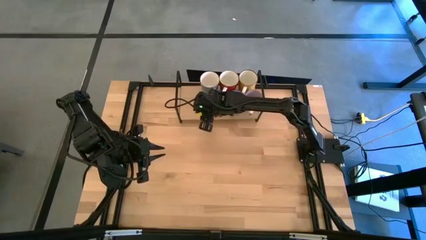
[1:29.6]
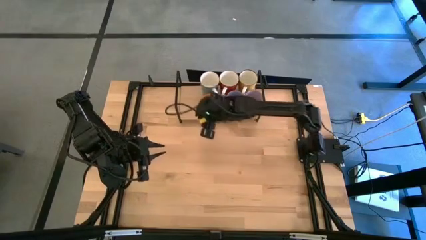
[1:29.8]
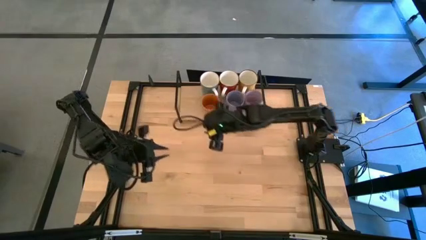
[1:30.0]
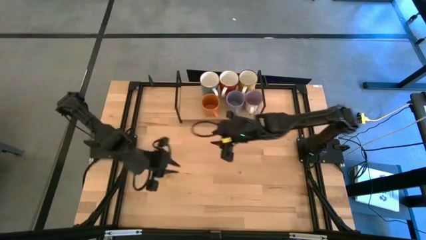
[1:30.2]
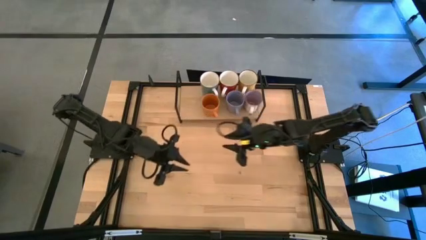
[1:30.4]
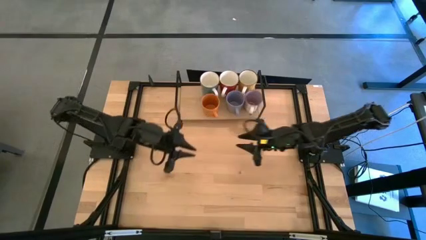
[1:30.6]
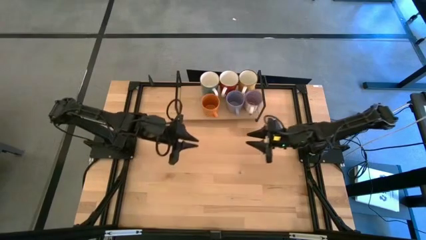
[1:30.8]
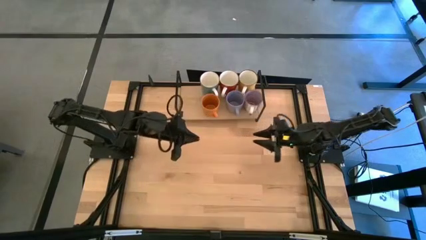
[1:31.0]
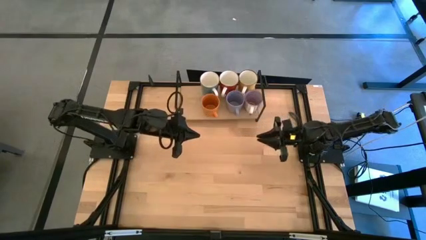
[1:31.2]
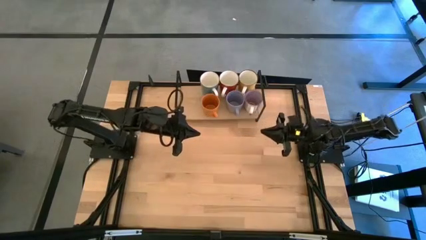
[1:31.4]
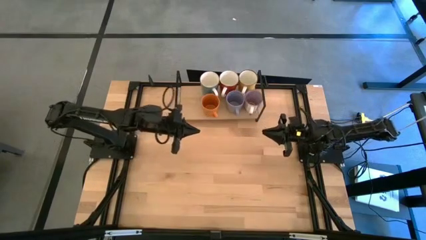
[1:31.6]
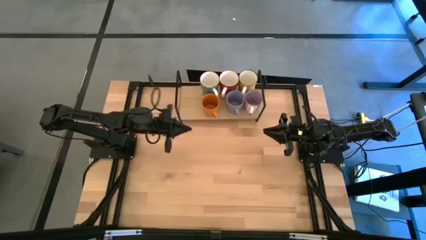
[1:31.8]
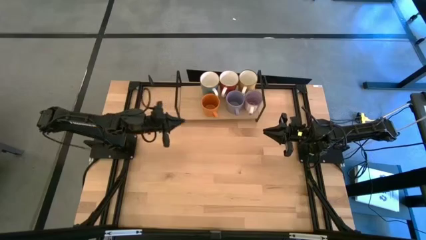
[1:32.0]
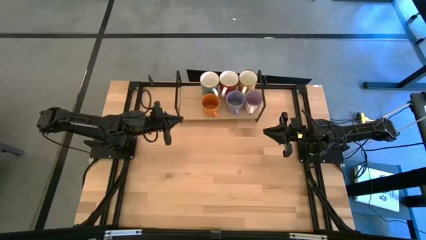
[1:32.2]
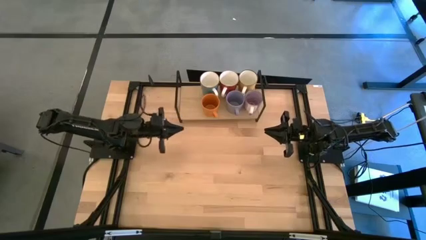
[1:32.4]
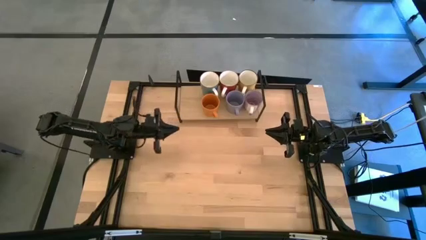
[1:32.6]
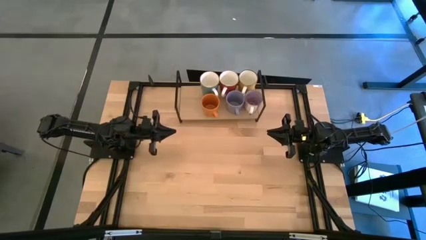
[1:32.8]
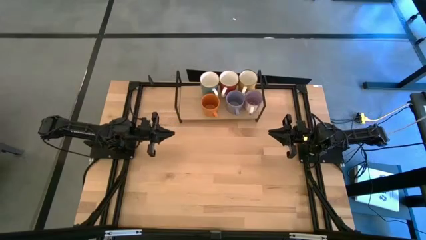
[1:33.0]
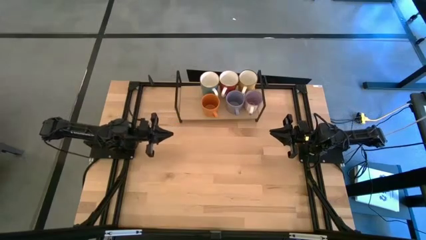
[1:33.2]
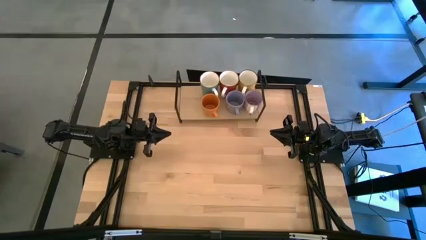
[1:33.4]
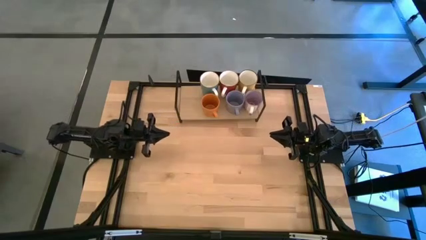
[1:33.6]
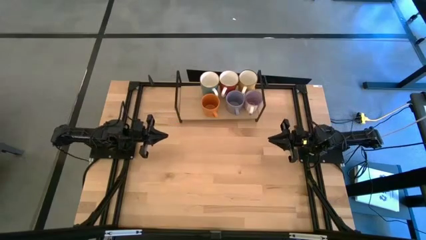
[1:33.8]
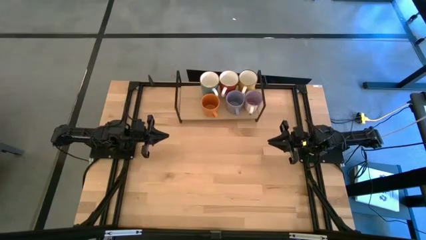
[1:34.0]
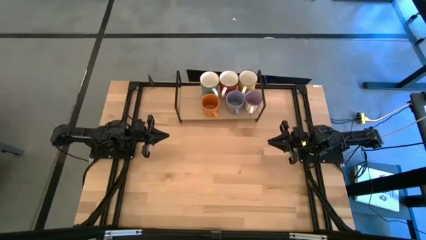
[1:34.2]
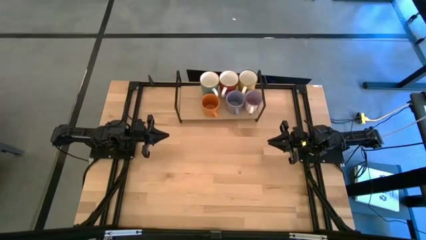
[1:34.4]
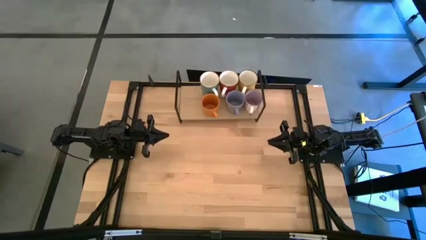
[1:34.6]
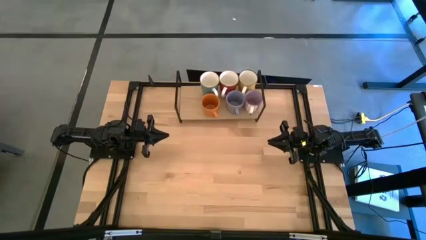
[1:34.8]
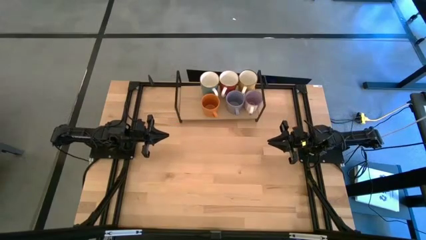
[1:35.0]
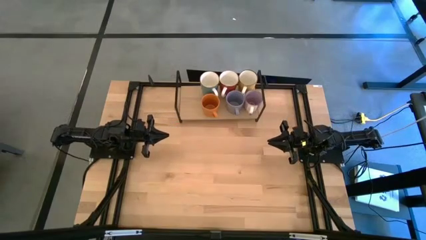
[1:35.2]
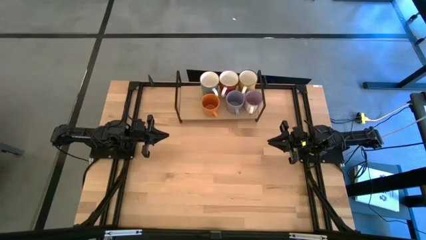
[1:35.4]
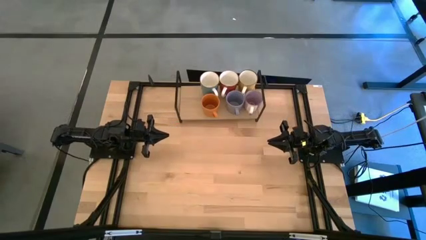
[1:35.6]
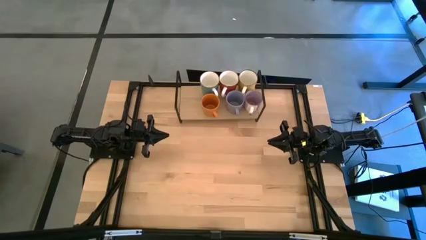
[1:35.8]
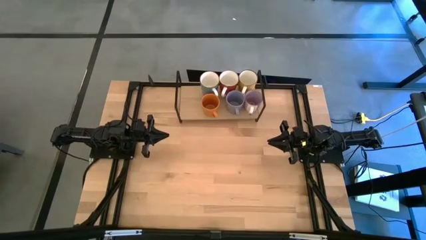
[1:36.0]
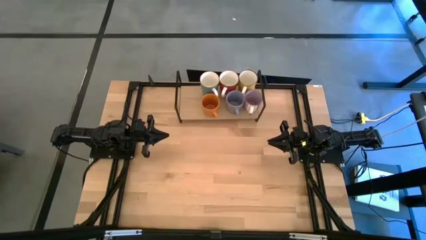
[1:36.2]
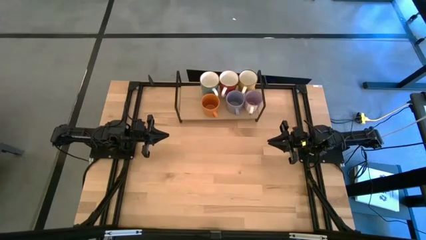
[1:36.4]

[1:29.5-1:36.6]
Task: Place coffee mugs
Return to Home Position

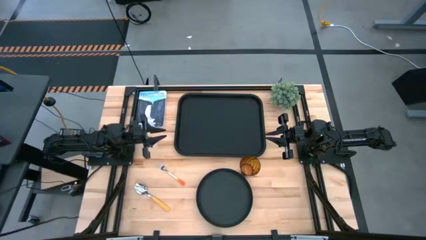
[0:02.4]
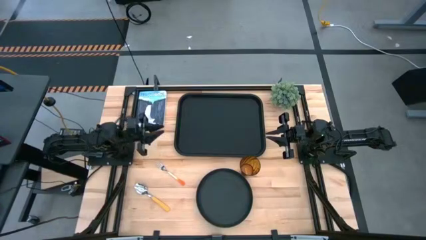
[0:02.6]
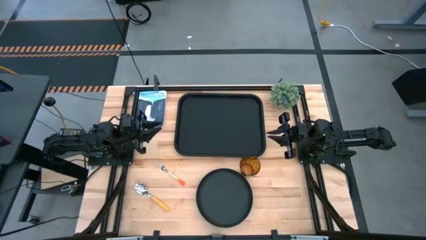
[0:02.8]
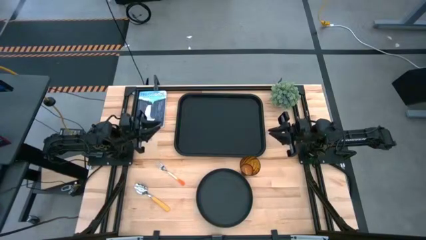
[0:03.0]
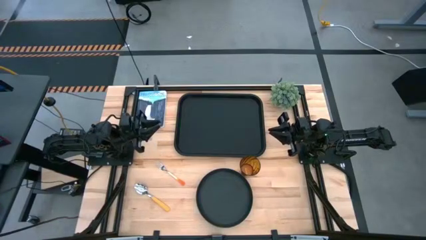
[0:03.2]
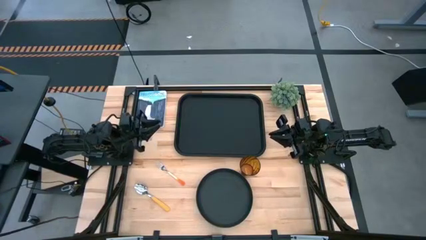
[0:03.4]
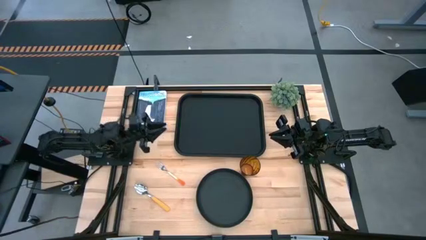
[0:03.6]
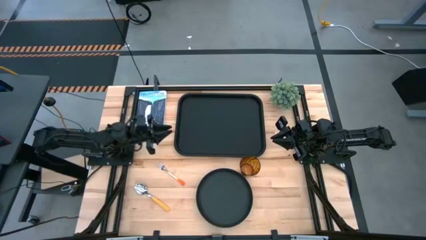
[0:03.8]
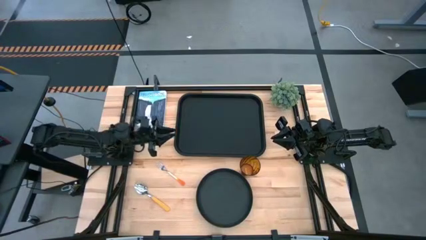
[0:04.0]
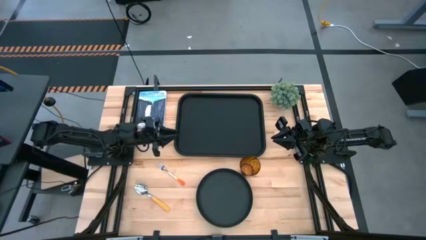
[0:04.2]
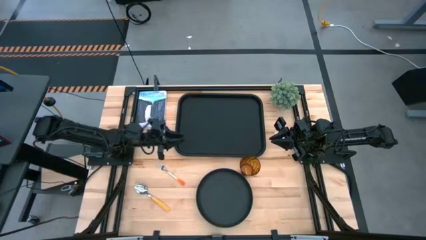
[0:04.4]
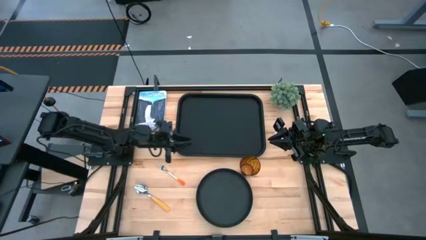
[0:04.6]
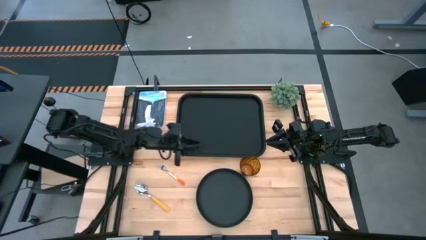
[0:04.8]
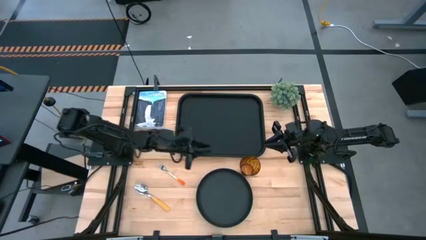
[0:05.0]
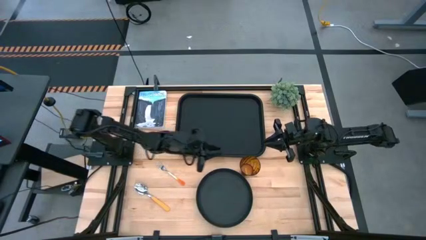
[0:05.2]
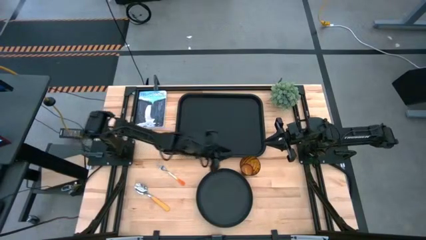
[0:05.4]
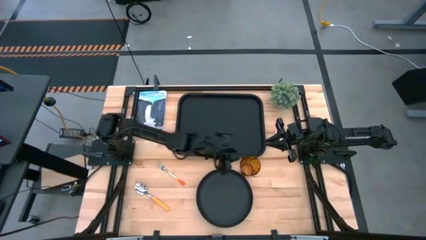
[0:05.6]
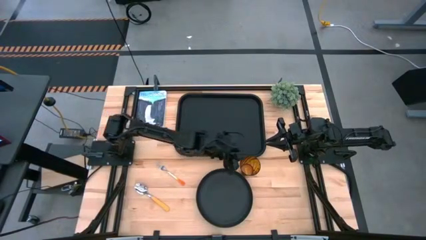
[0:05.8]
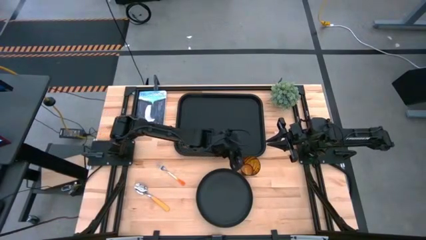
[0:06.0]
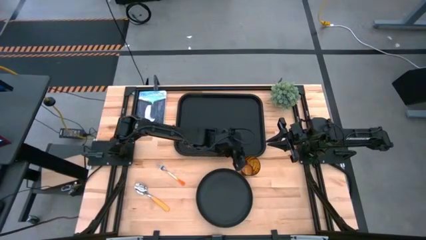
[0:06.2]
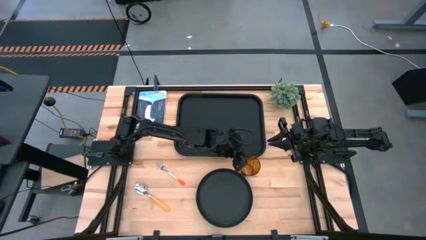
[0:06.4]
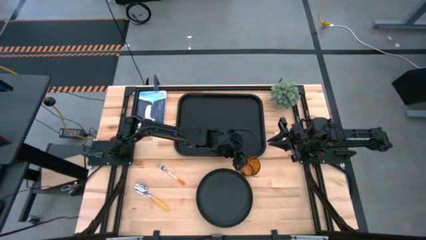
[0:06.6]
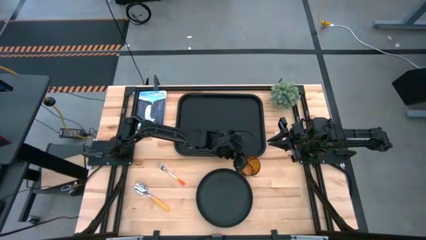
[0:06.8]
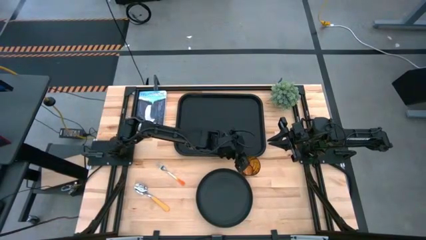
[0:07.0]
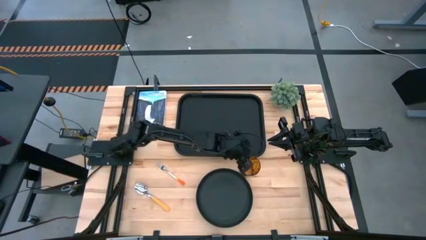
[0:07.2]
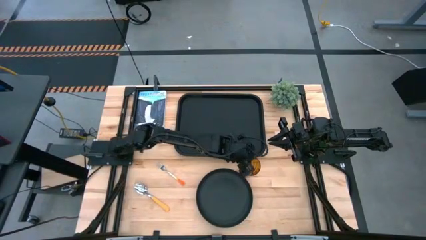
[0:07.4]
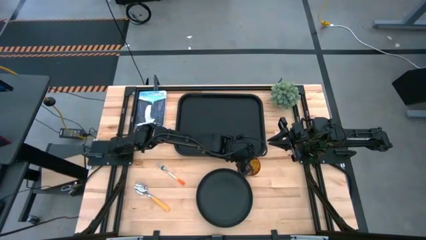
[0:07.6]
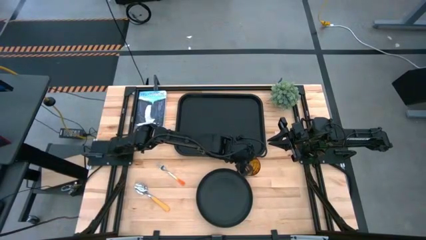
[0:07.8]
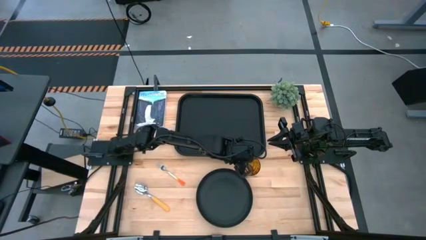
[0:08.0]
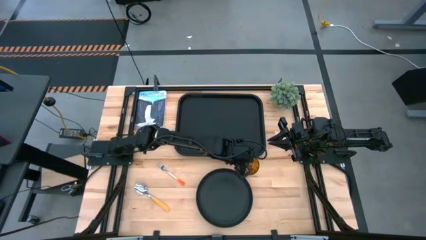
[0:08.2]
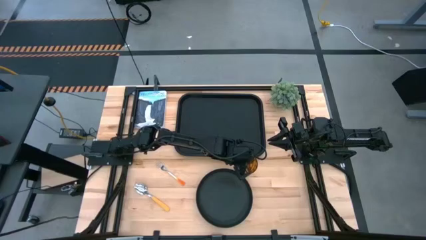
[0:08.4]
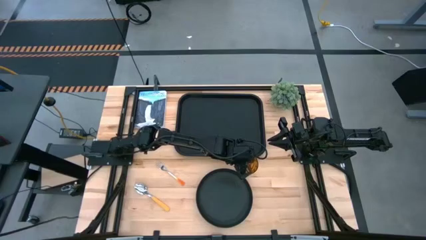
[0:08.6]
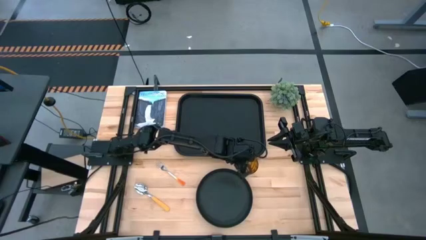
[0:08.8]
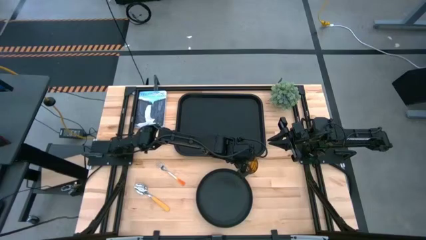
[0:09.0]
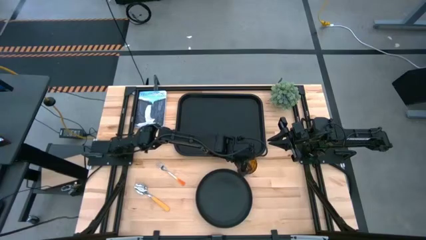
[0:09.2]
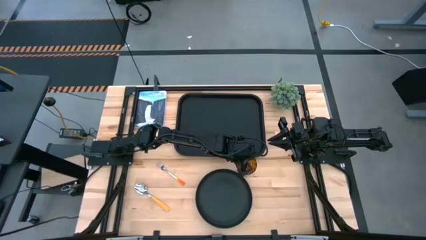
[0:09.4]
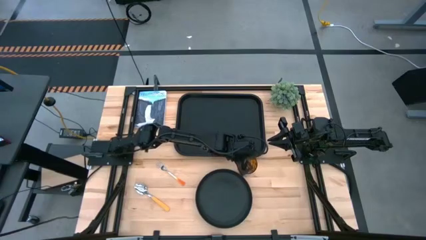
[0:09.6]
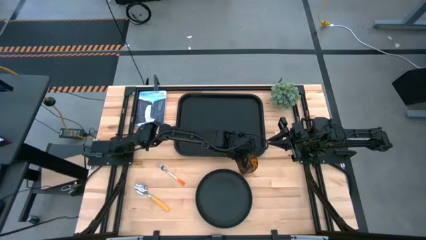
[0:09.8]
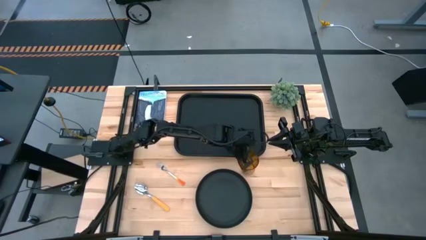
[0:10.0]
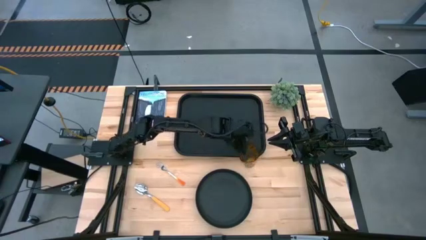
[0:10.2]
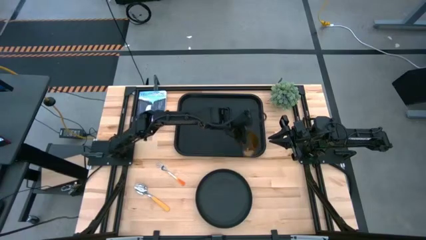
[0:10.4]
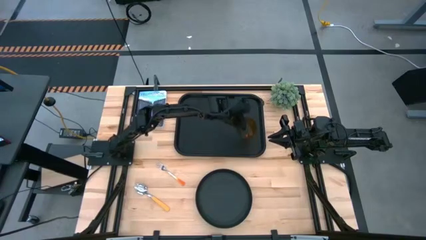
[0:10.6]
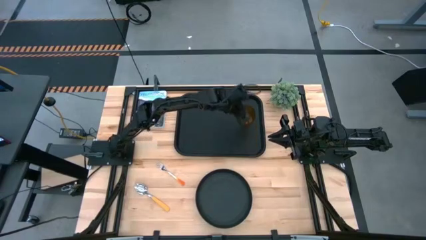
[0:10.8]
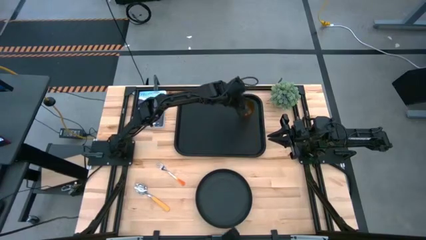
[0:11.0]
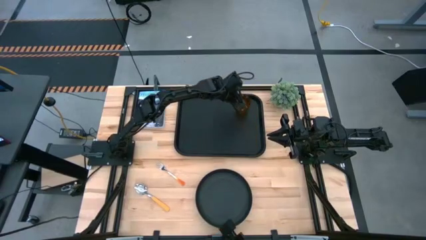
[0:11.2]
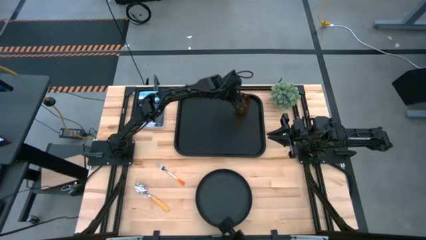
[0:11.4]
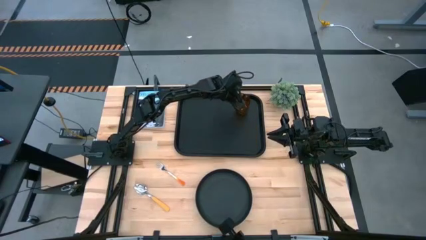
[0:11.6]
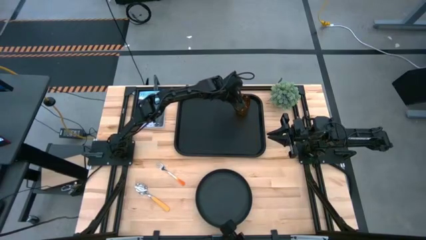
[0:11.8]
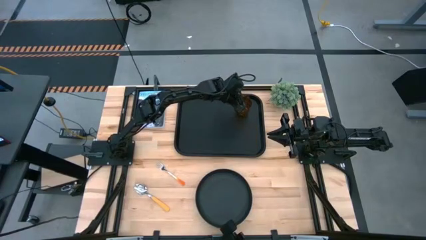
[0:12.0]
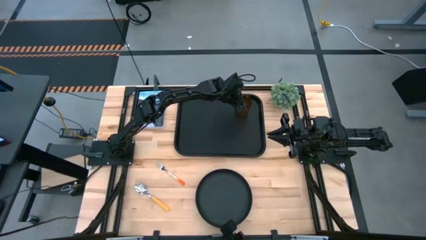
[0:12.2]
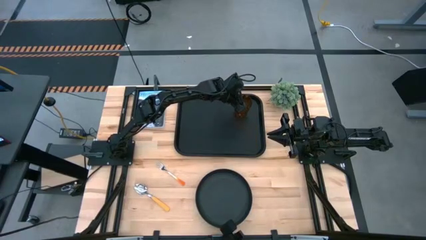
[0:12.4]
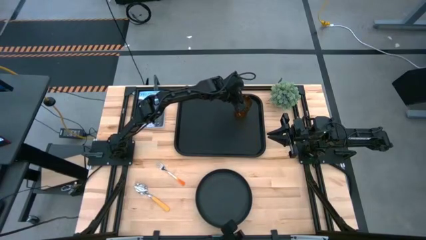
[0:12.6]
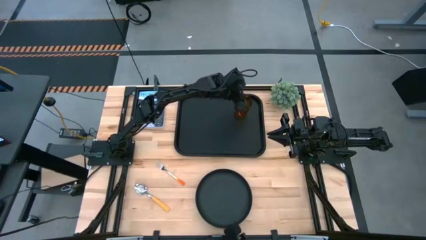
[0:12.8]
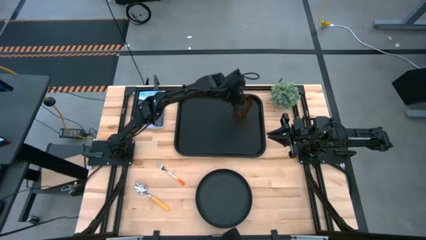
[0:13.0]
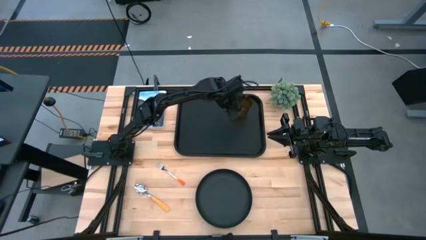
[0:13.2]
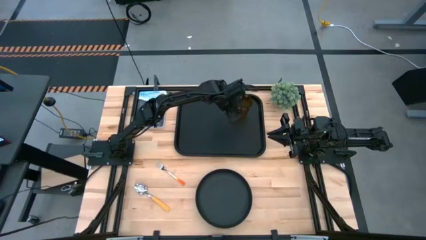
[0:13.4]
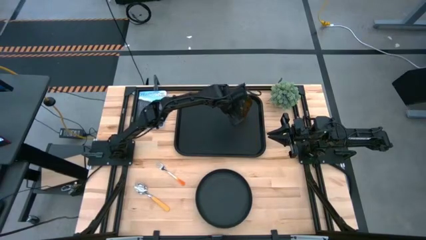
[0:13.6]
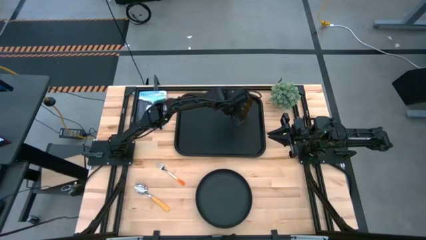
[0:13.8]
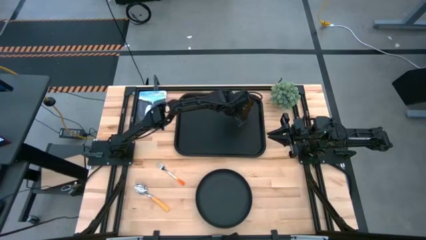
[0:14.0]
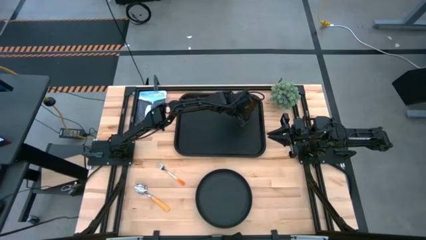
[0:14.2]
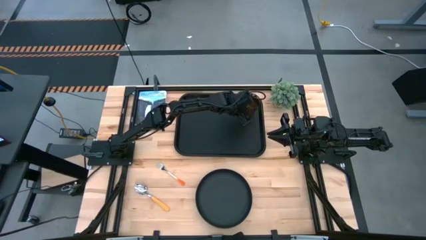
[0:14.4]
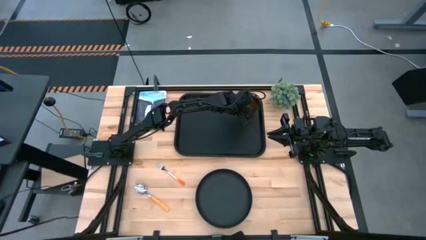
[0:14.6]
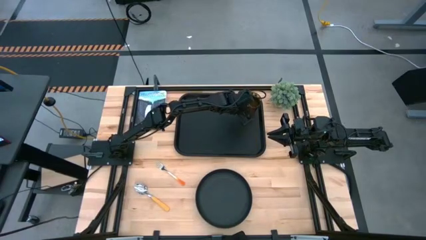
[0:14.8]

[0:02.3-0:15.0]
Task: Pick and place plate/cup/fork/spoon on tray
Put the brown cup on the black tray
